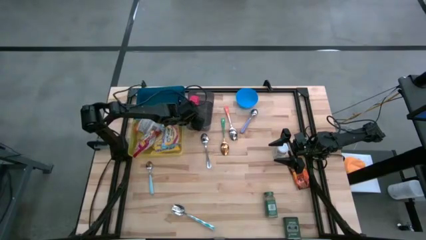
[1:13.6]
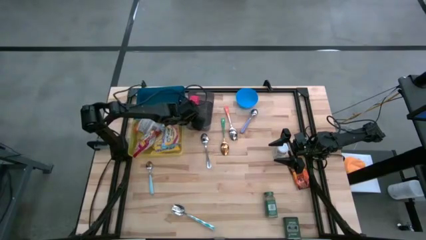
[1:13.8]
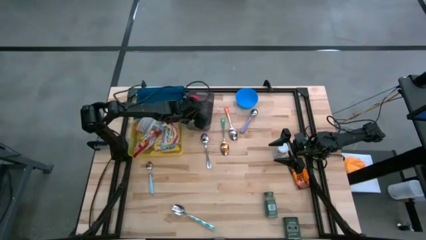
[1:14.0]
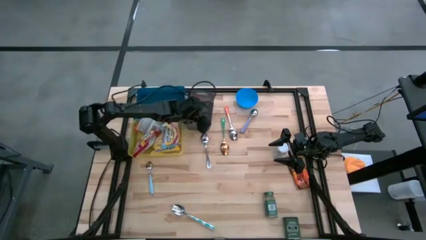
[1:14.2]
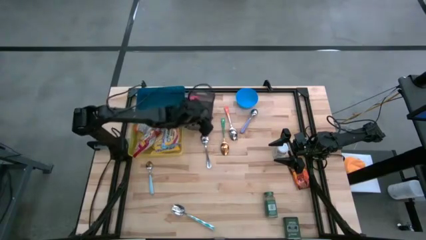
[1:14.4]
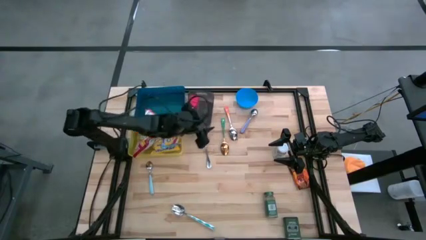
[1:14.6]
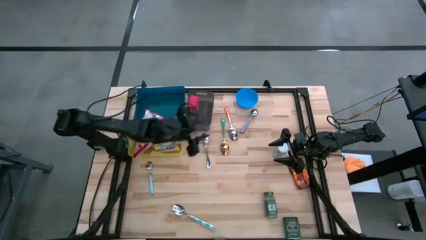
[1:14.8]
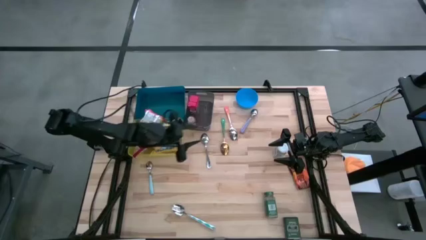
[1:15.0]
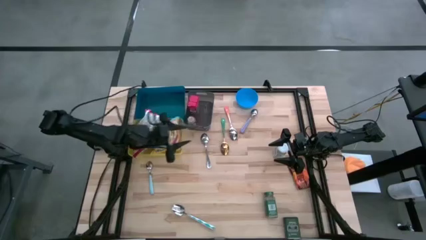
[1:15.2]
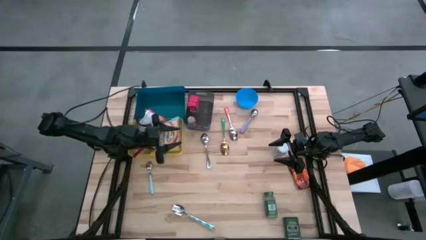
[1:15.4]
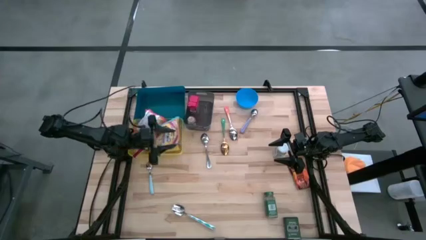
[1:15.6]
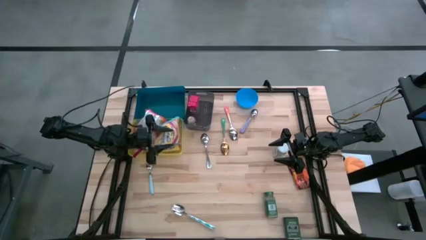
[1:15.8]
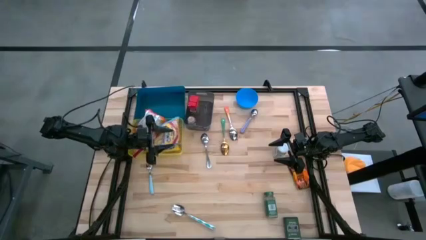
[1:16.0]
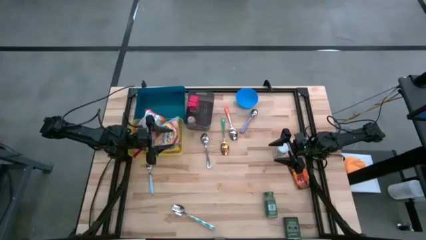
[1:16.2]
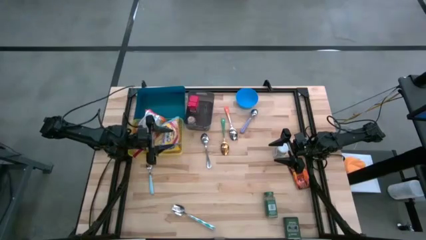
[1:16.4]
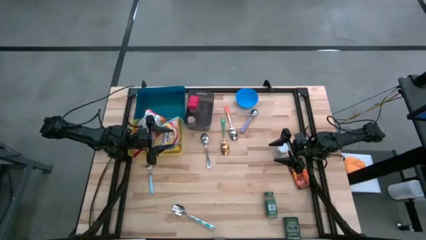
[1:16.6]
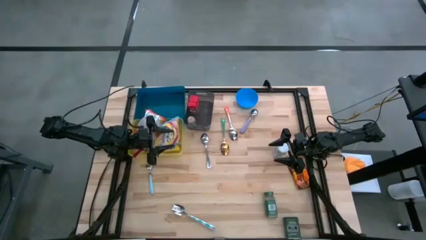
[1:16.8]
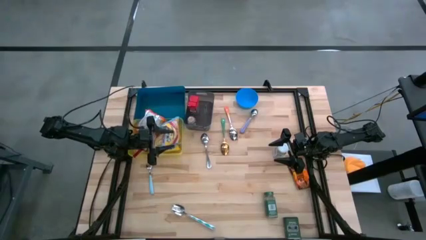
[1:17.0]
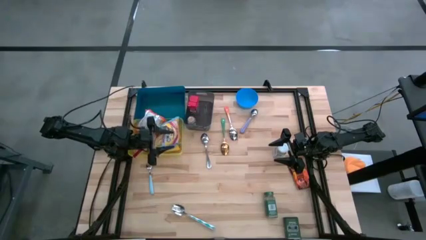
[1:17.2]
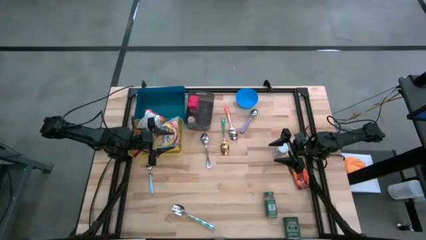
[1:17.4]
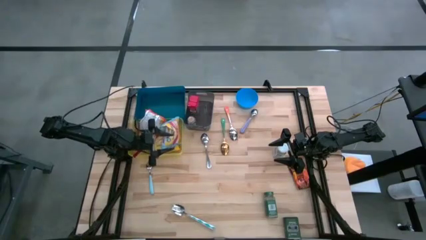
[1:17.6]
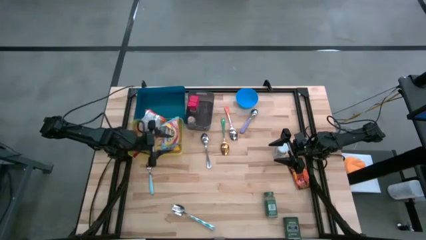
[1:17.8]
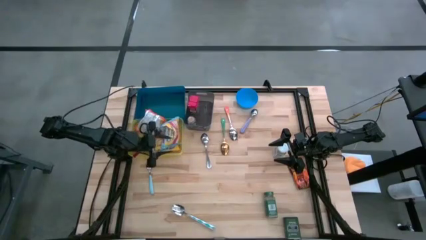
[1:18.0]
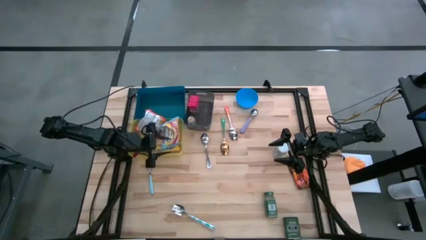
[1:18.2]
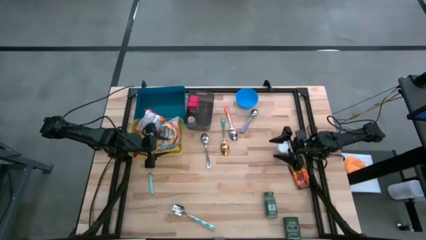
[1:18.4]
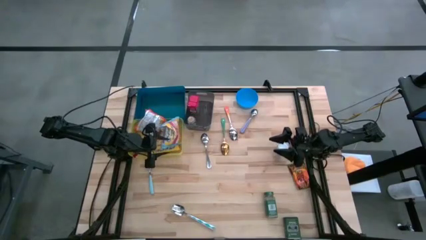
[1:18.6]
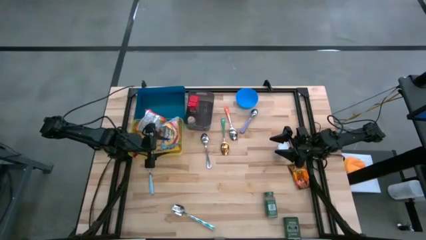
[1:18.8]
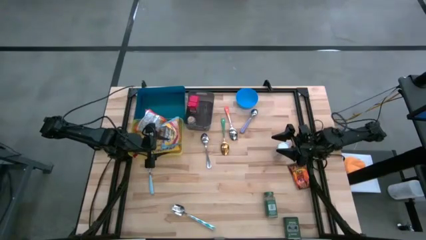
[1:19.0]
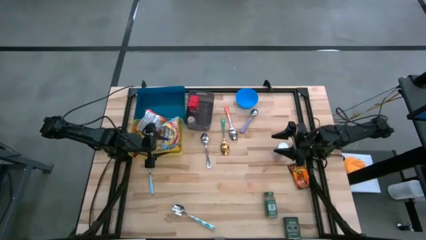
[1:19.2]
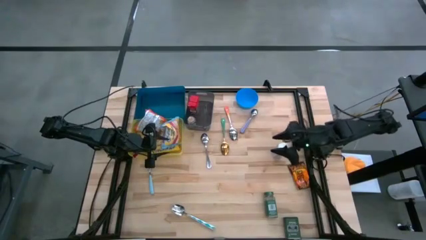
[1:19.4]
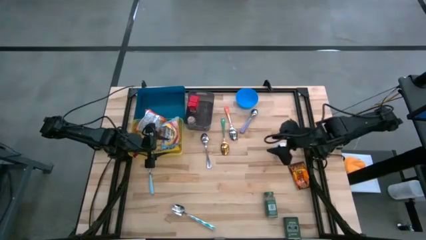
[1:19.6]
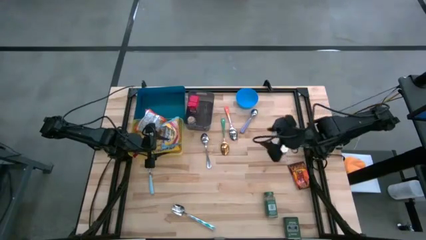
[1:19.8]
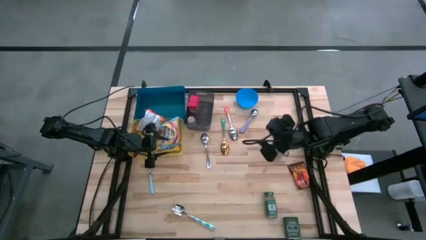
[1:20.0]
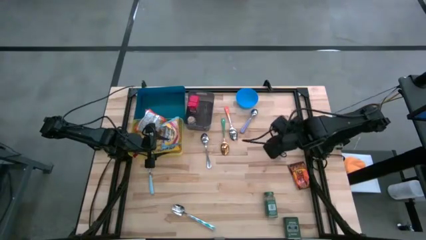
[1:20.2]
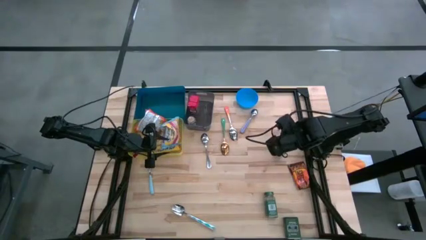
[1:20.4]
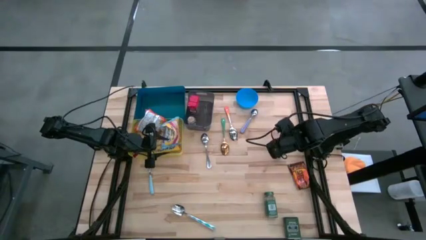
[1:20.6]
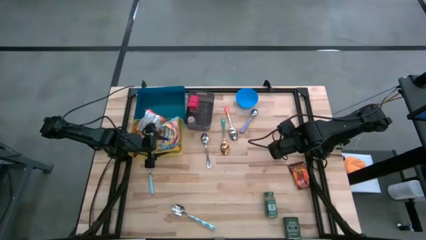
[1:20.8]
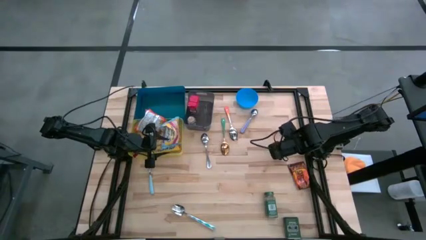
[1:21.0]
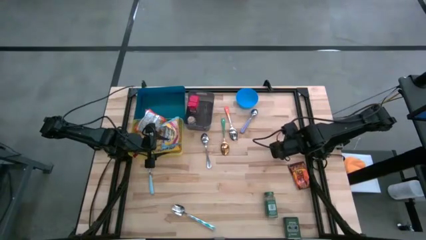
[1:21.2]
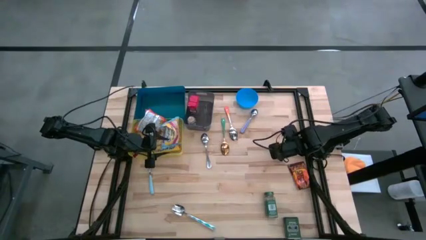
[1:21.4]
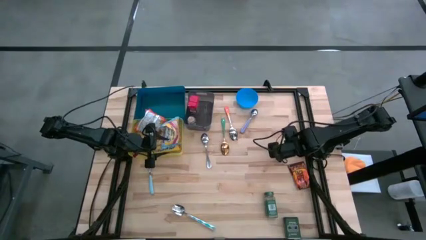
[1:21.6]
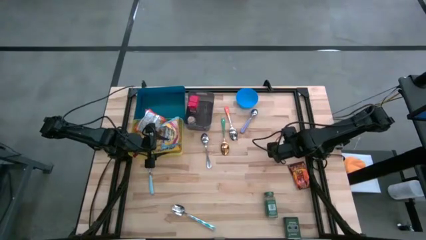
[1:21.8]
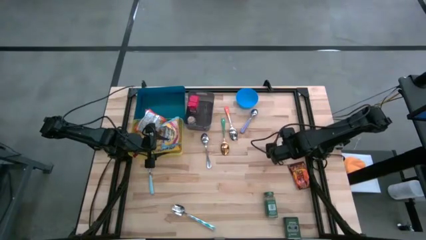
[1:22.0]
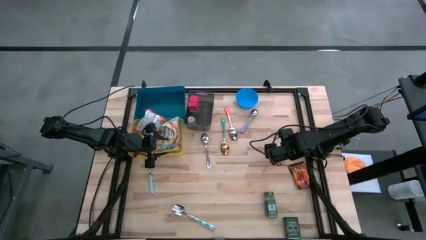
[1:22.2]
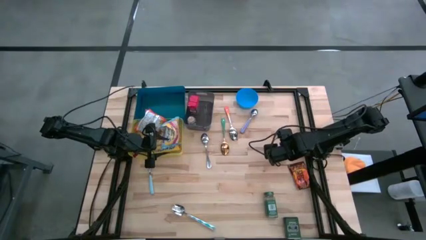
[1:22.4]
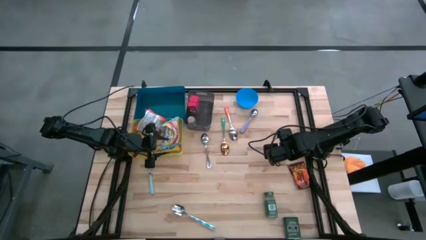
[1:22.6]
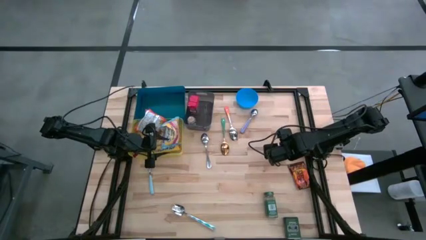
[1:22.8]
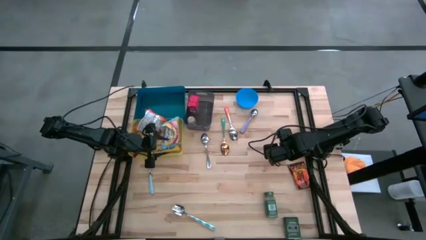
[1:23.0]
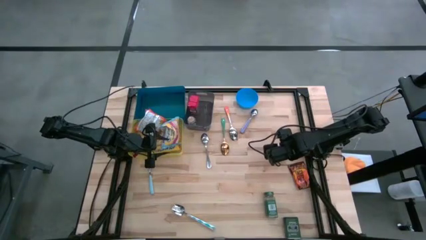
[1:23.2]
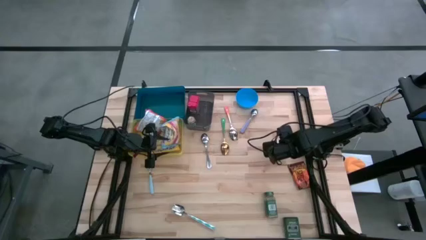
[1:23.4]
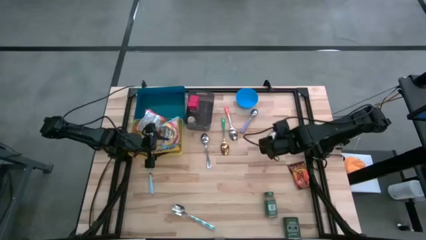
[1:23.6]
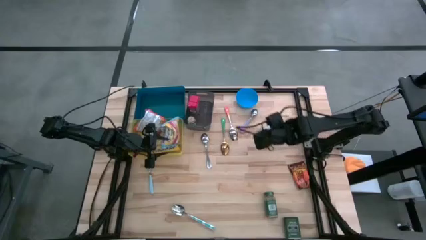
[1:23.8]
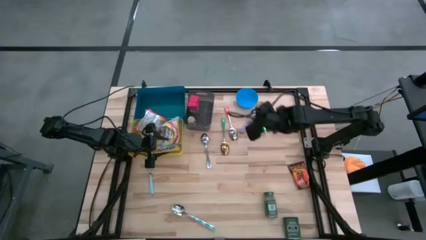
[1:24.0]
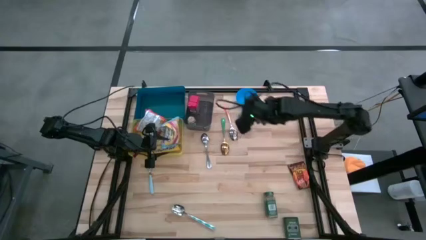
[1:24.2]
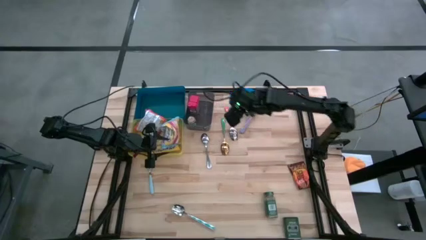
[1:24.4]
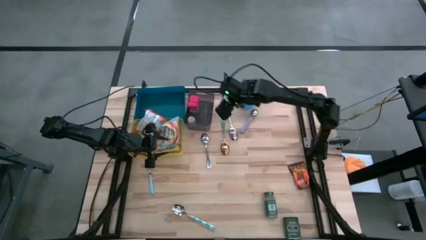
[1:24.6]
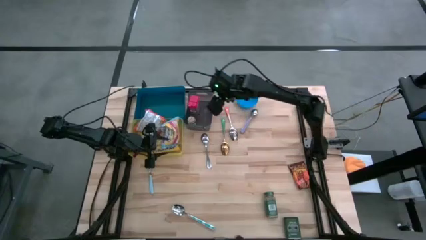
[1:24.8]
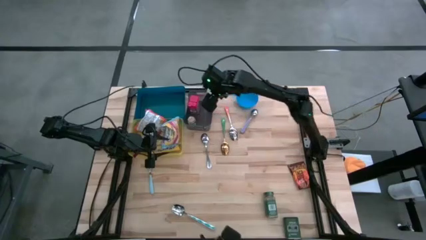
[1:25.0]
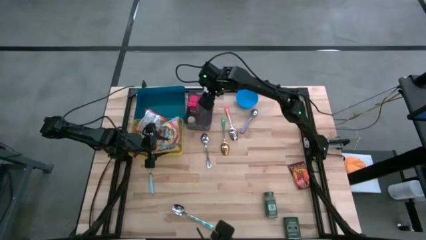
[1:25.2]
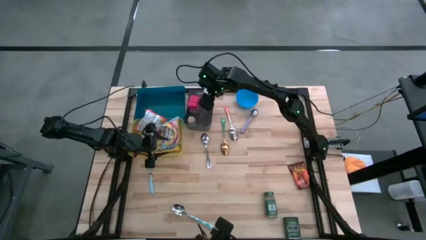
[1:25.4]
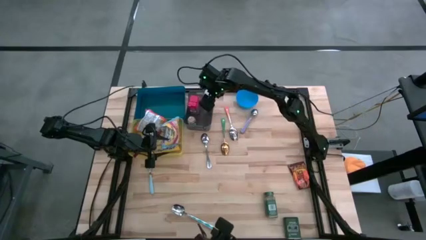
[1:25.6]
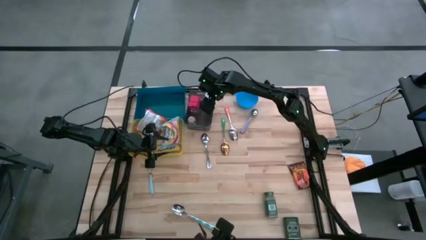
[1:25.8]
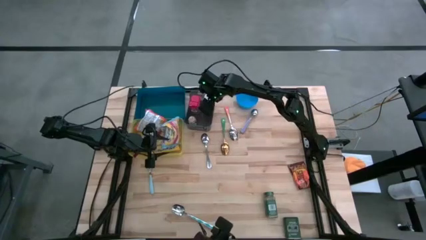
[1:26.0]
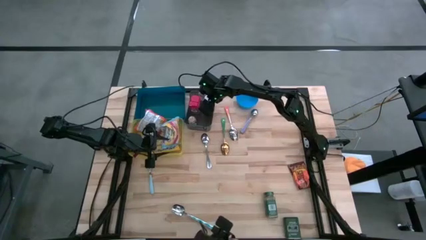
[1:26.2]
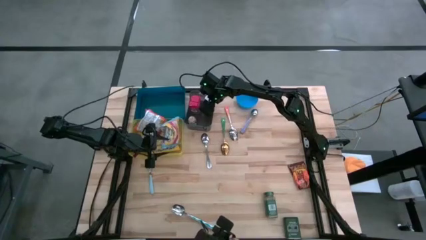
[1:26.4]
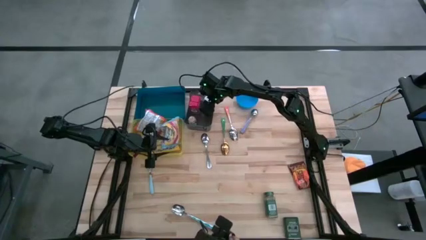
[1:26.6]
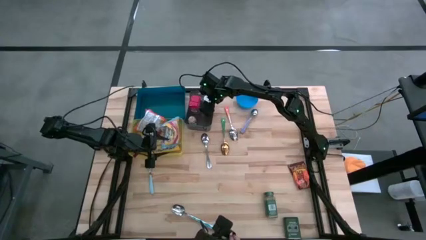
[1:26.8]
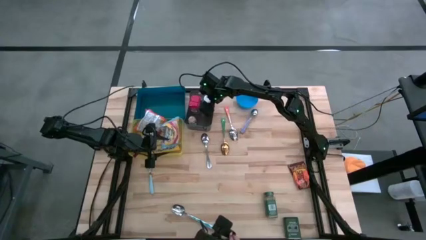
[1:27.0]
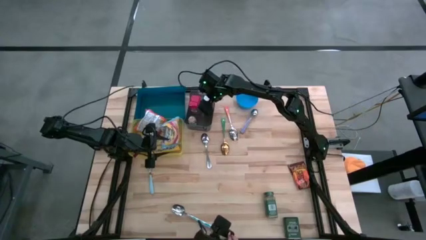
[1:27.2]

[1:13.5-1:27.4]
Put the white seasoning bottle into the black bin
